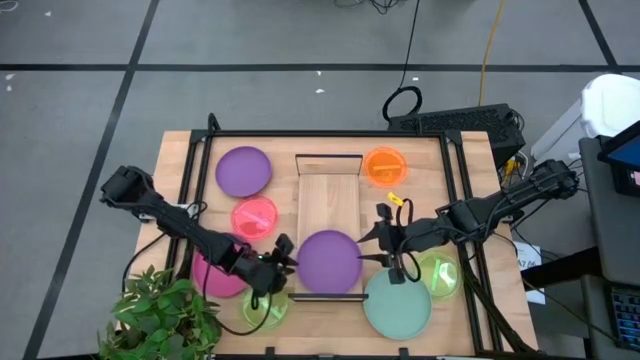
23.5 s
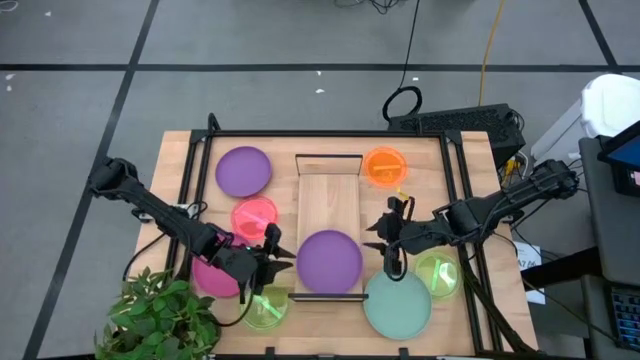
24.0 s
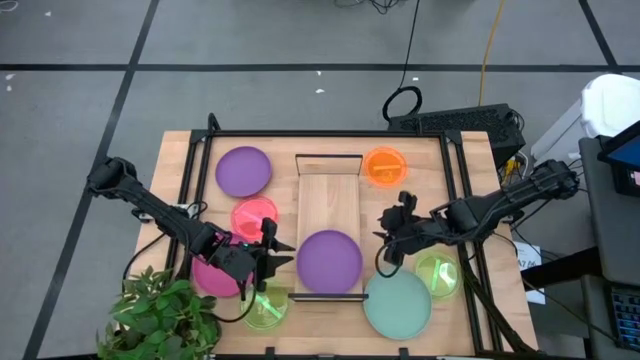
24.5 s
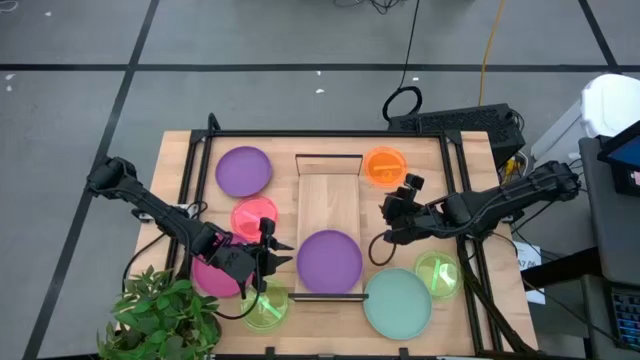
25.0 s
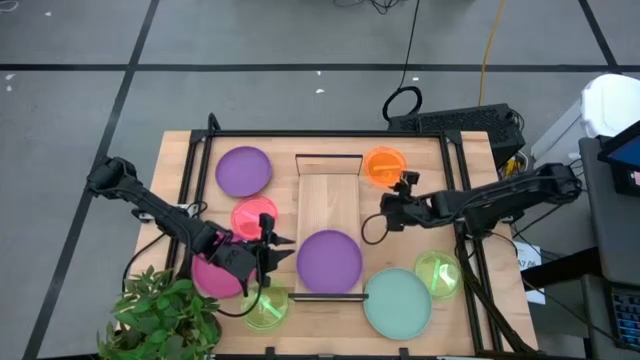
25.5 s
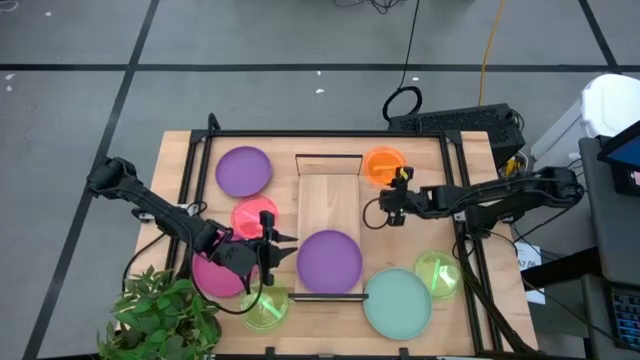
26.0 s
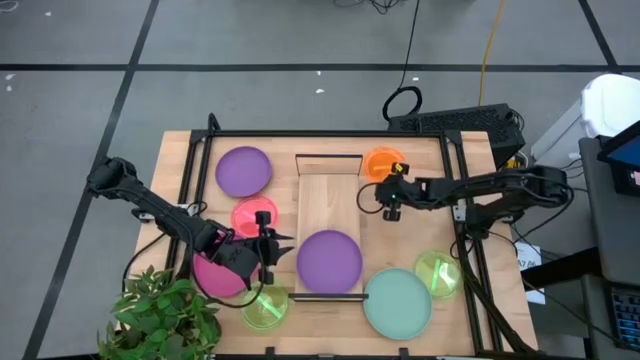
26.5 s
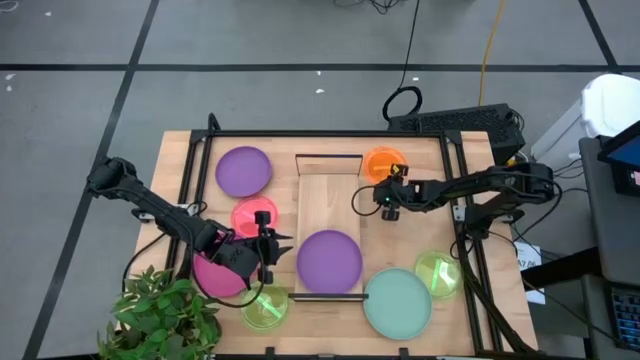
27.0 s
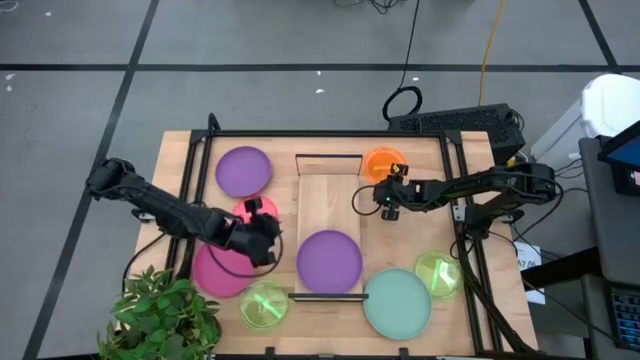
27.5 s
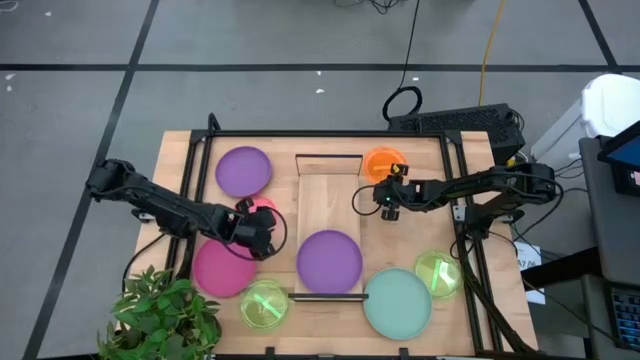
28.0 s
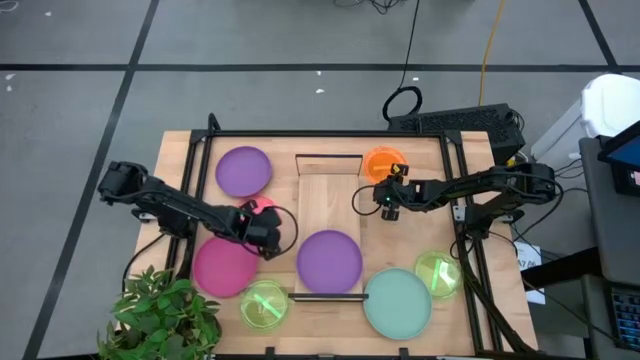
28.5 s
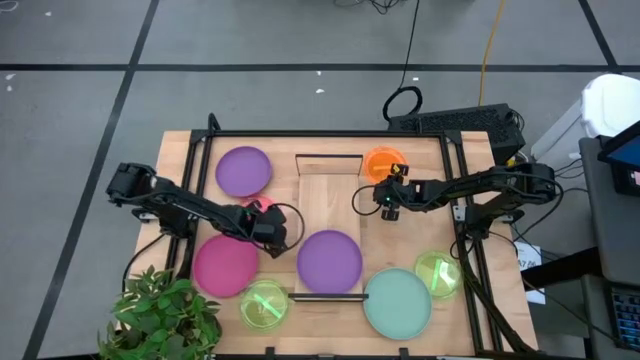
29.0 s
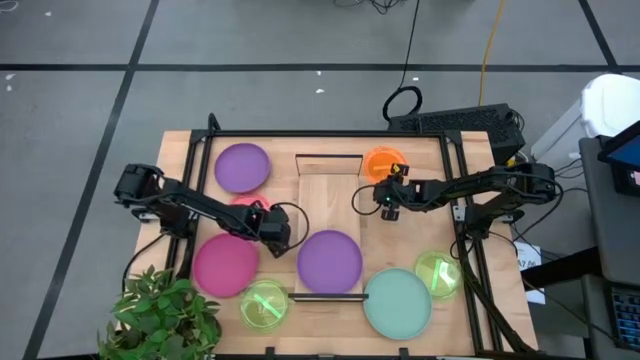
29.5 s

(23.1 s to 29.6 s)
Task: Place and stack plates onto a shelf
Put the small pink plate on the shelf

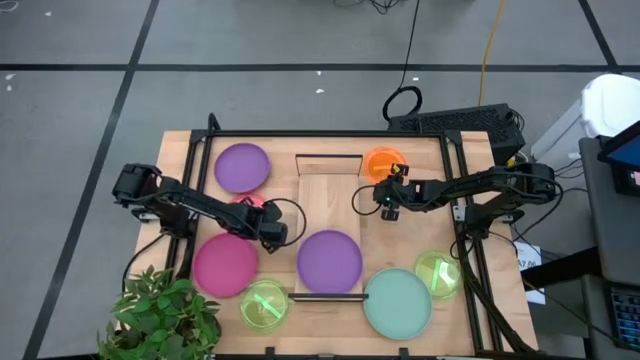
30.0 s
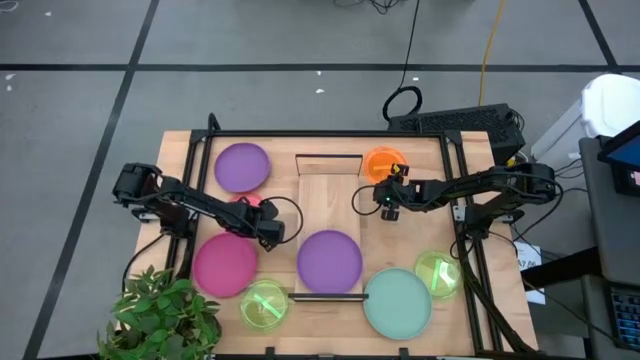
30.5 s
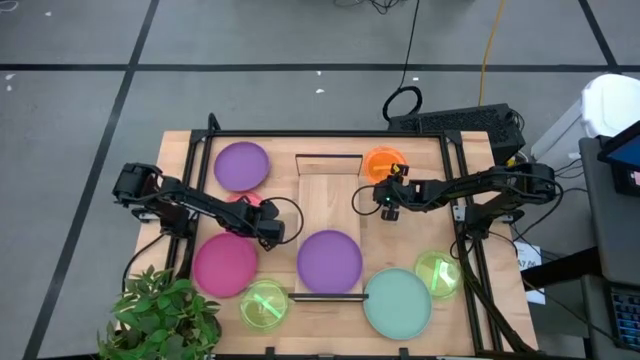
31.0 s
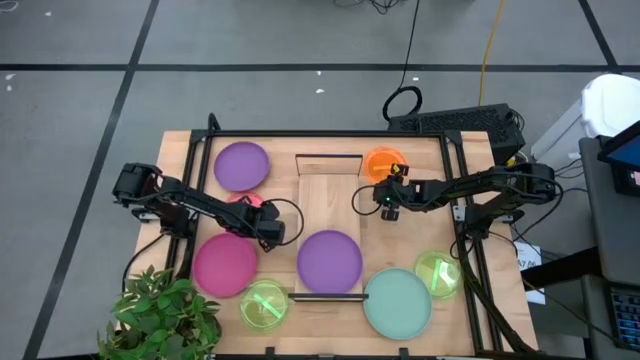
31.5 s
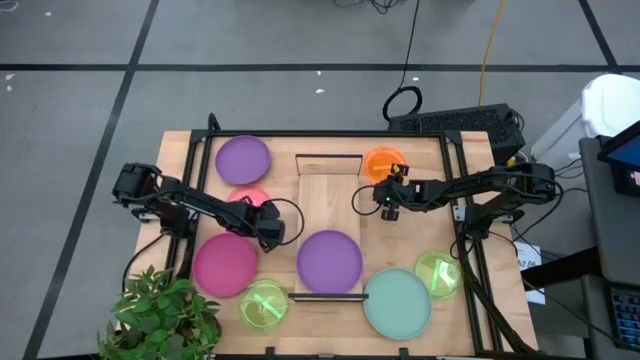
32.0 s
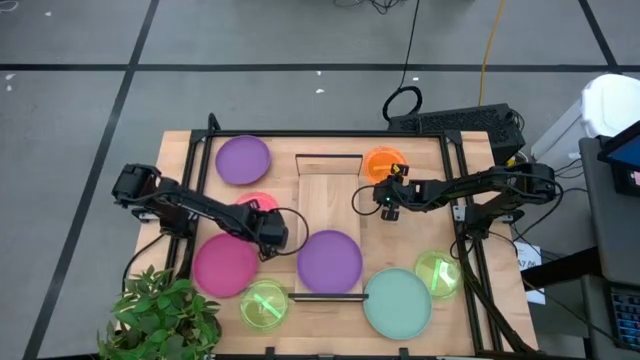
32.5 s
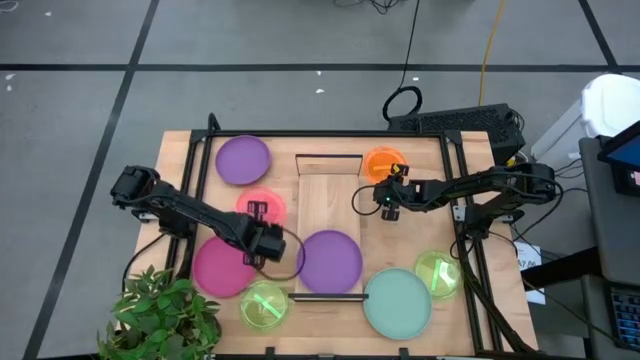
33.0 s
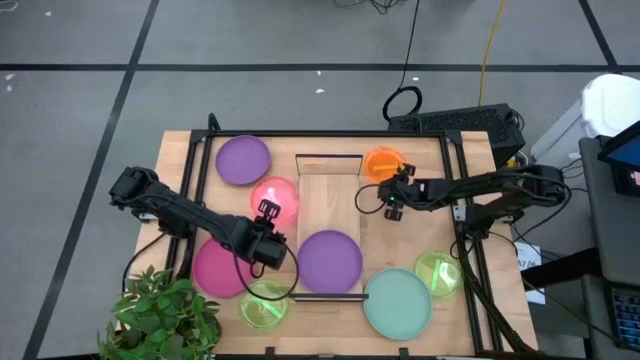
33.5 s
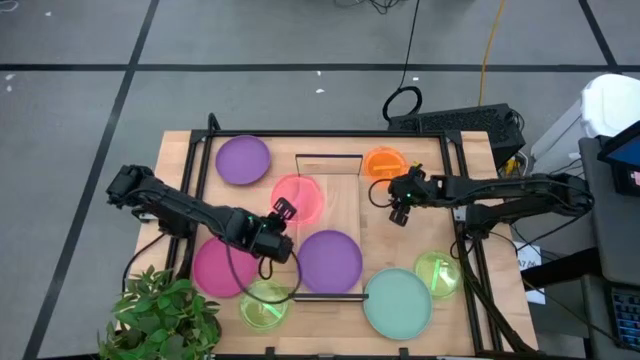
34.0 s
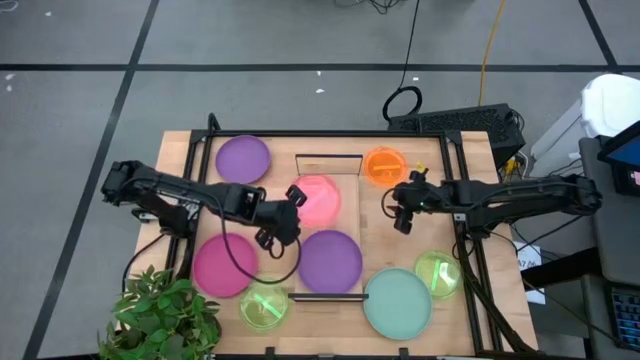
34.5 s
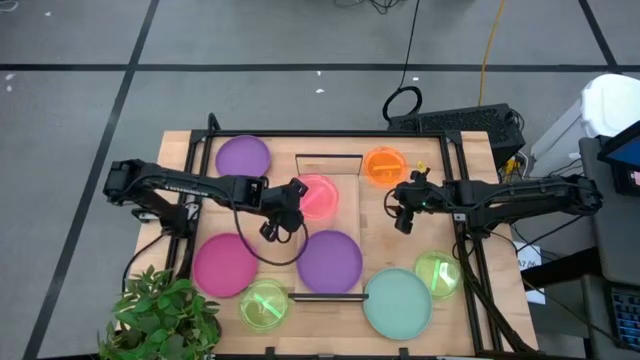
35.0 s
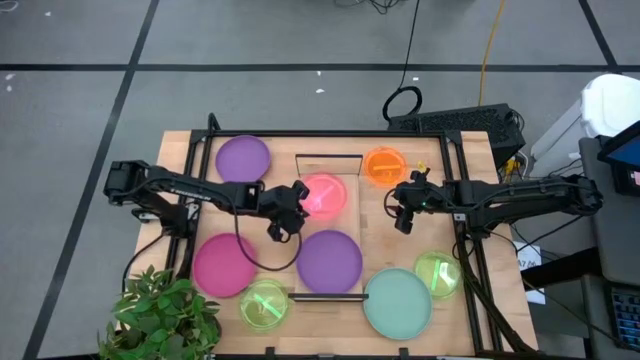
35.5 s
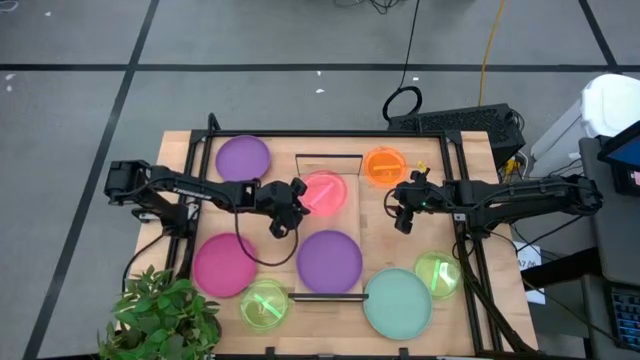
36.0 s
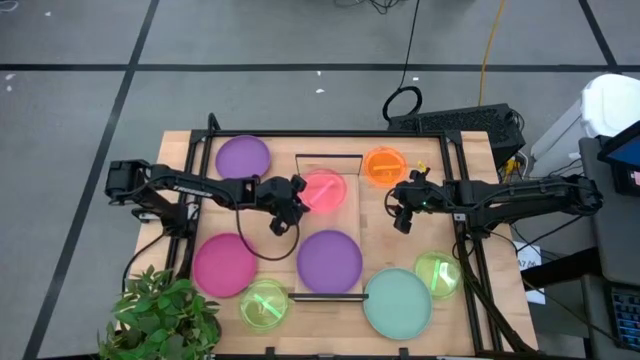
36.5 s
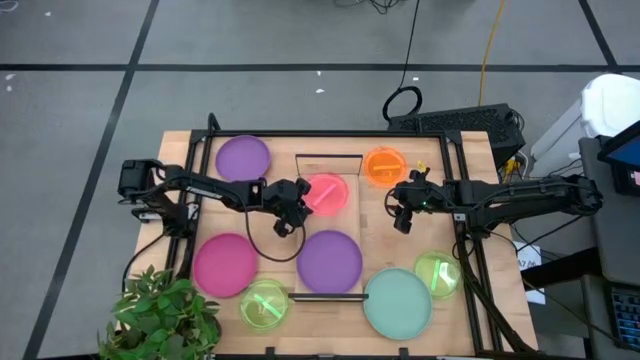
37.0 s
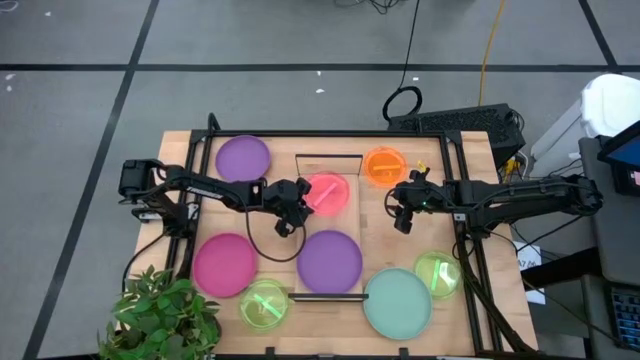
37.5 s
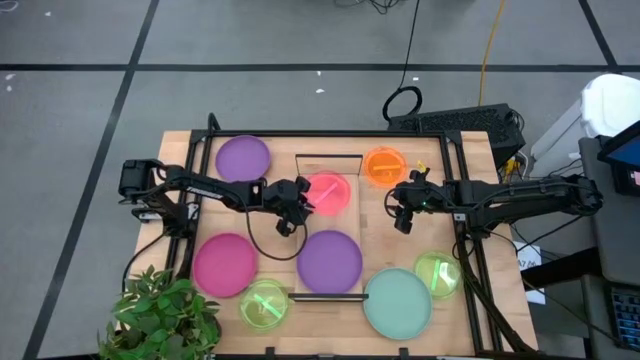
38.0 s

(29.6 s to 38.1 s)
Put the small pink plate on the shelf

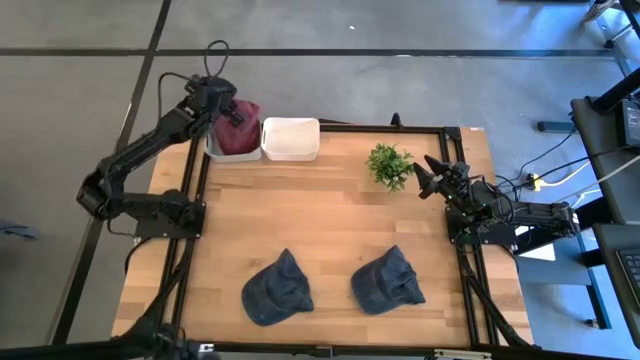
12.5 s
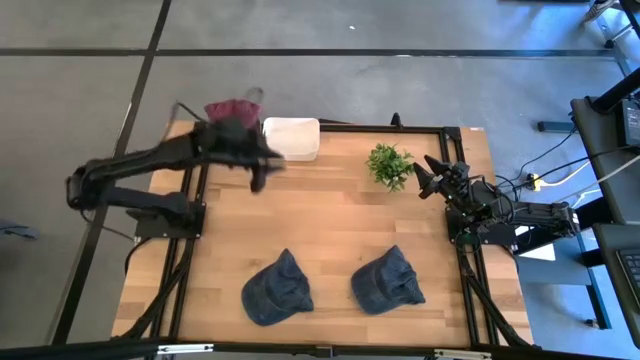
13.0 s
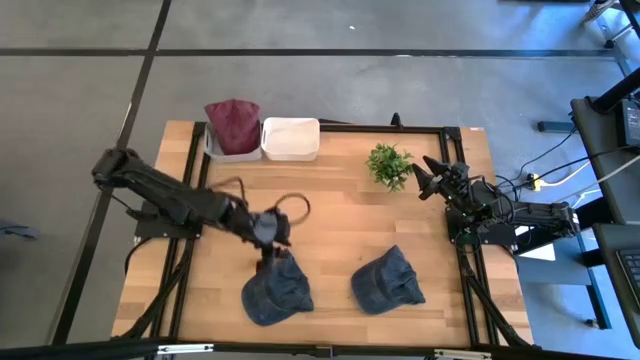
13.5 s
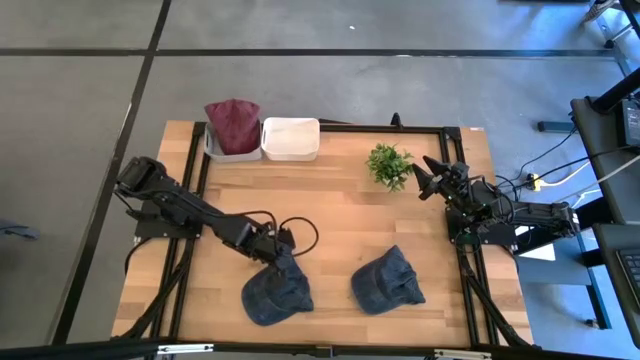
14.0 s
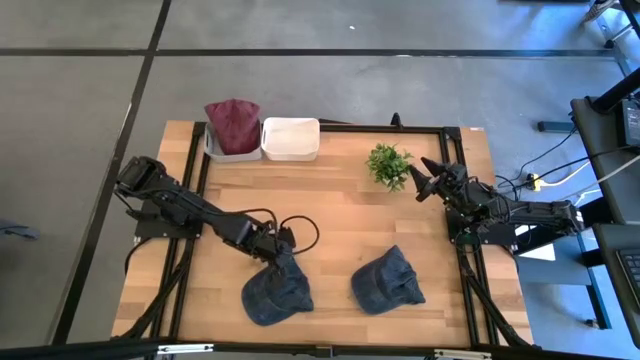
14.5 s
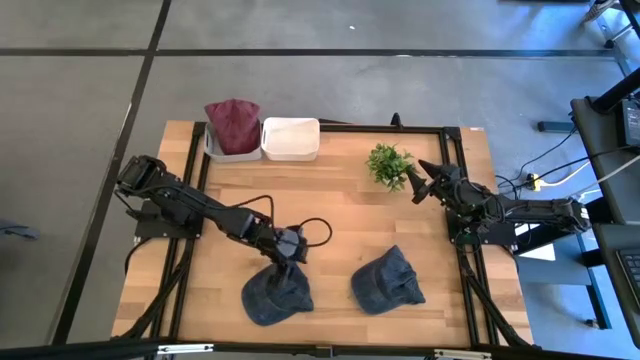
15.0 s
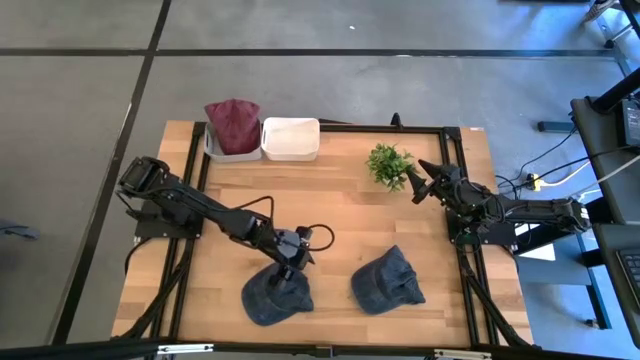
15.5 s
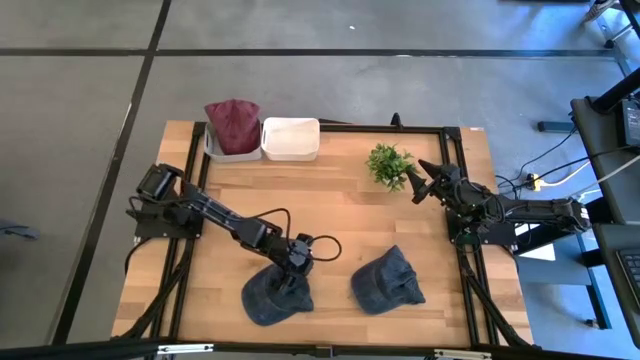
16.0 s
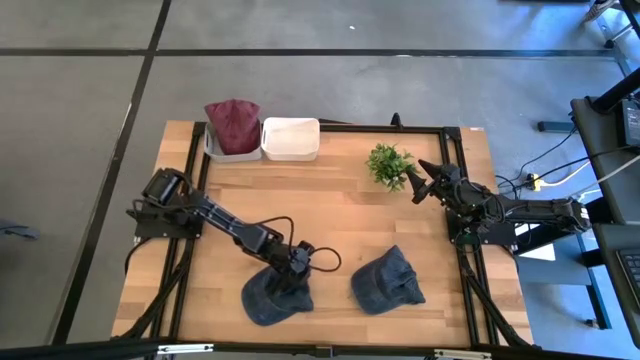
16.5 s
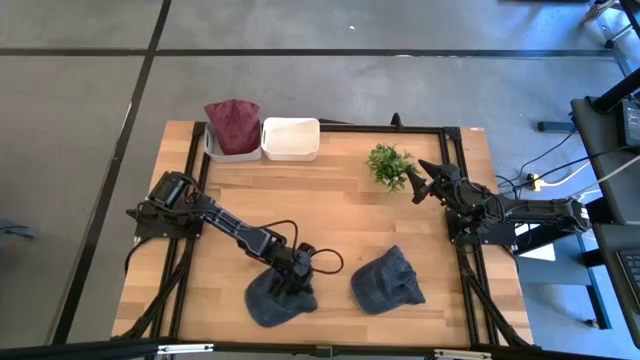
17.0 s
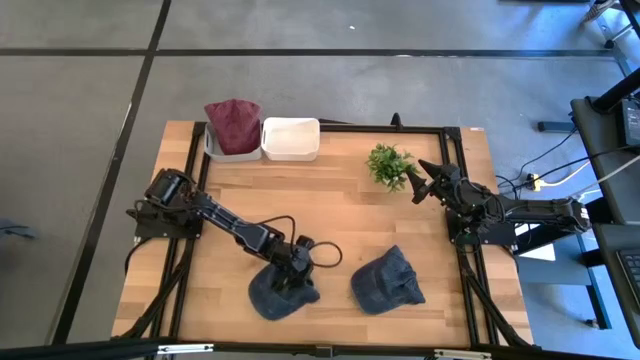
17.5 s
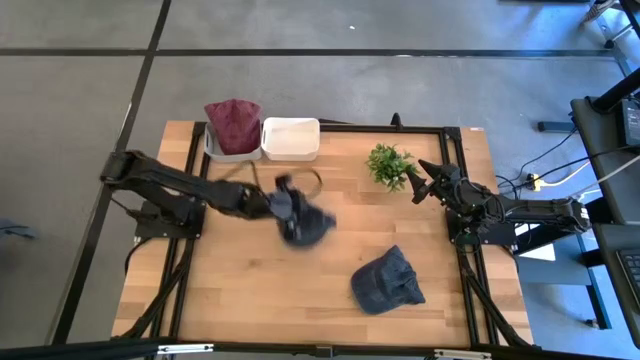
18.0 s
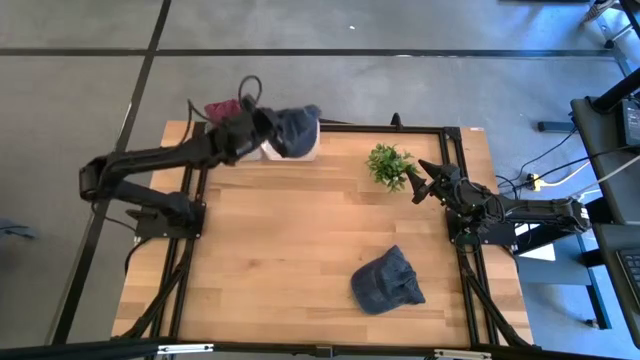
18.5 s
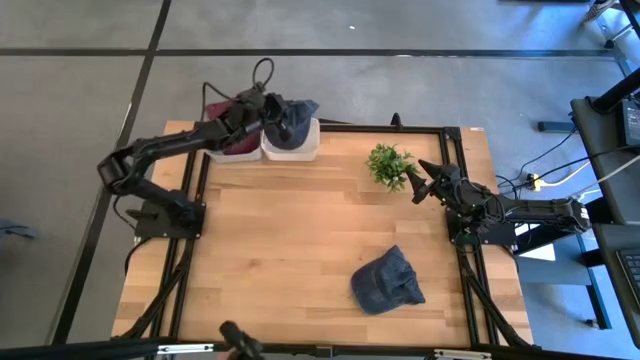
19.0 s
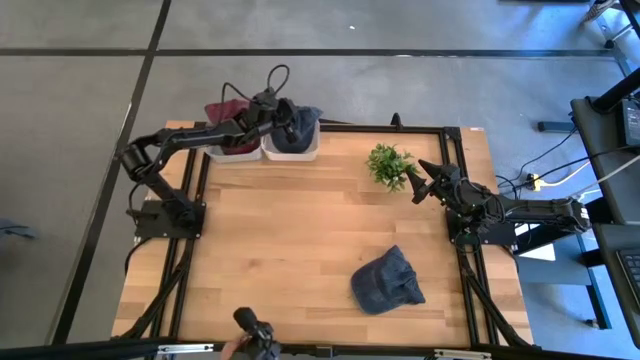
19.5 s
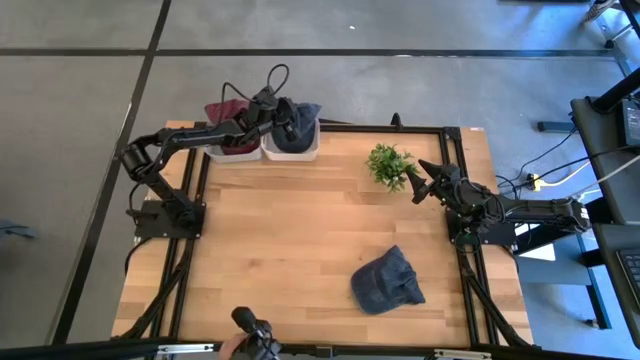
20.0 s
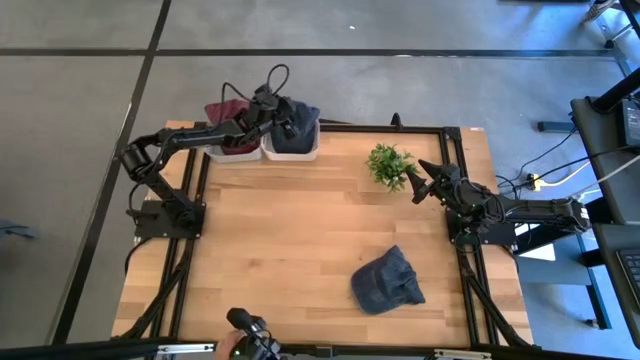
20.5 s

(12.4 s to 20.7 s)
Task: Pick & Place hat
Put the left black cap into the white bin
